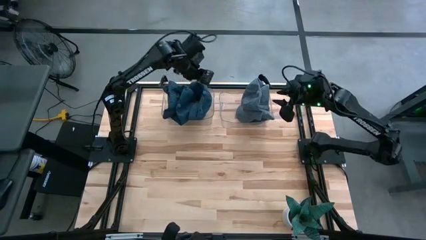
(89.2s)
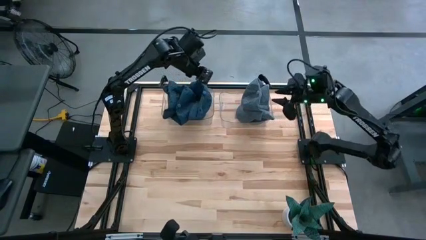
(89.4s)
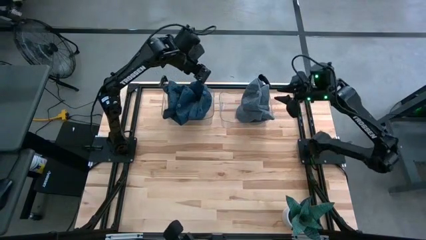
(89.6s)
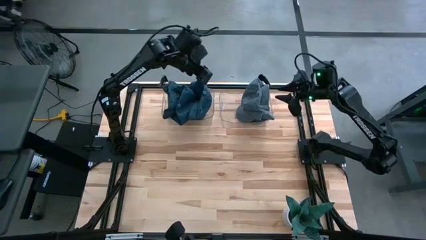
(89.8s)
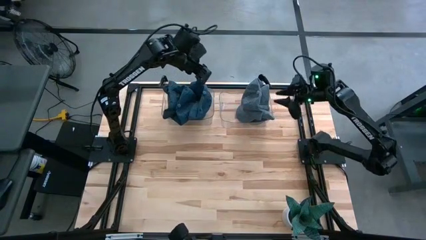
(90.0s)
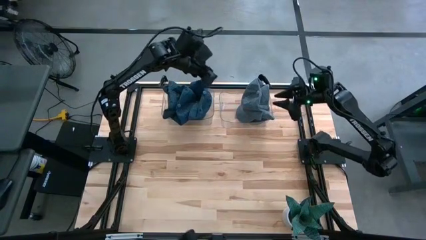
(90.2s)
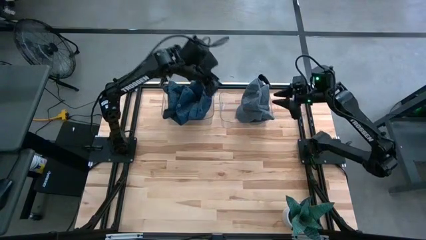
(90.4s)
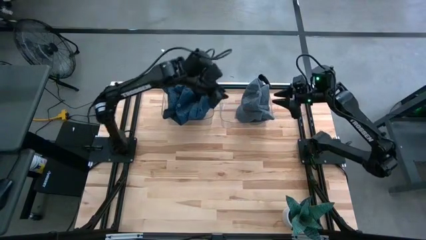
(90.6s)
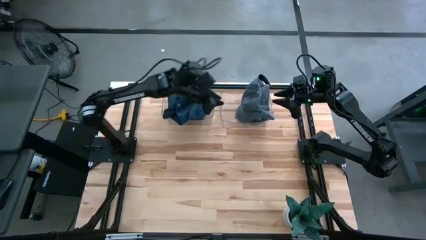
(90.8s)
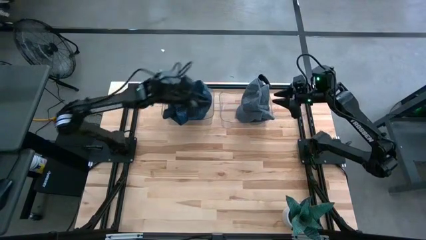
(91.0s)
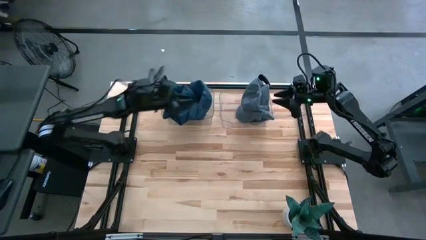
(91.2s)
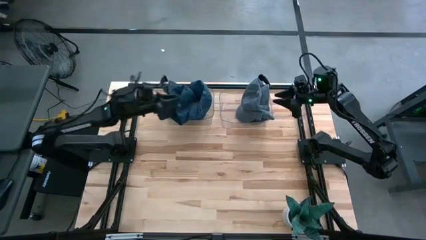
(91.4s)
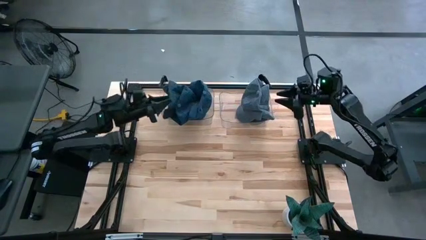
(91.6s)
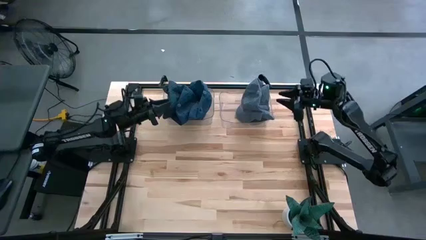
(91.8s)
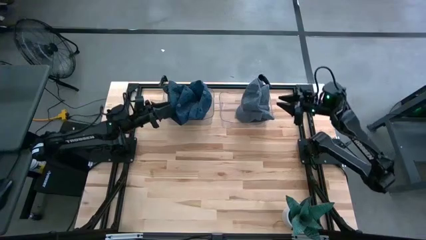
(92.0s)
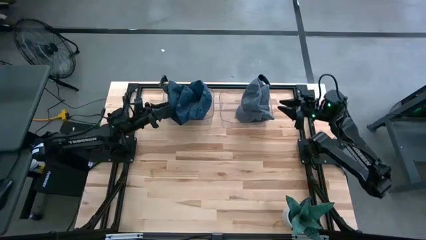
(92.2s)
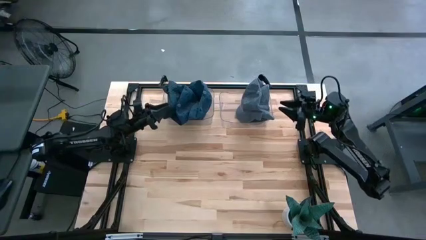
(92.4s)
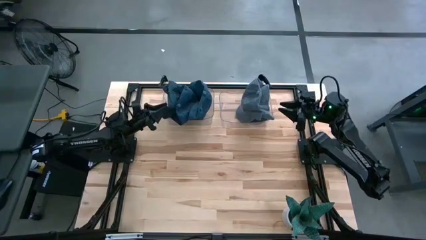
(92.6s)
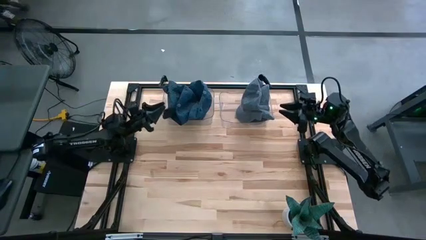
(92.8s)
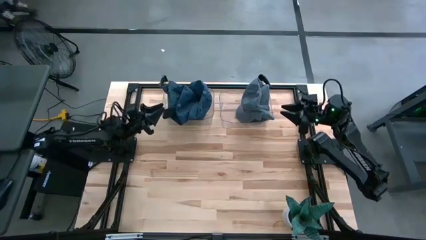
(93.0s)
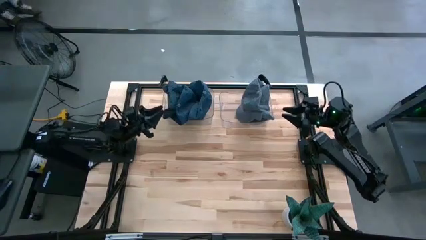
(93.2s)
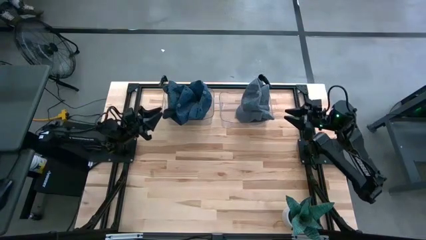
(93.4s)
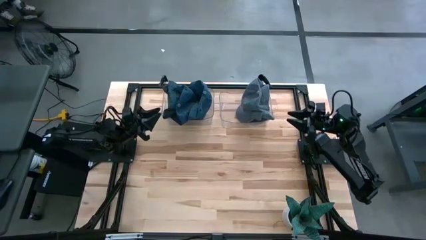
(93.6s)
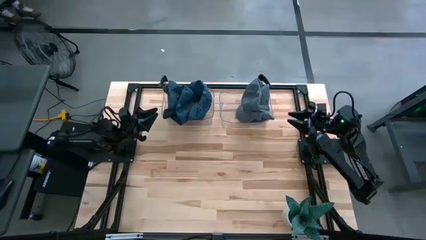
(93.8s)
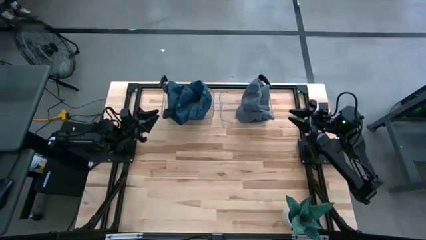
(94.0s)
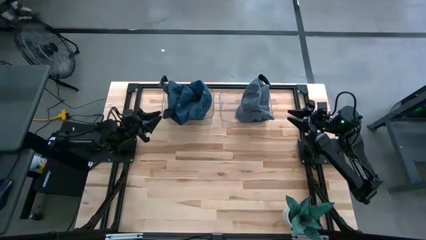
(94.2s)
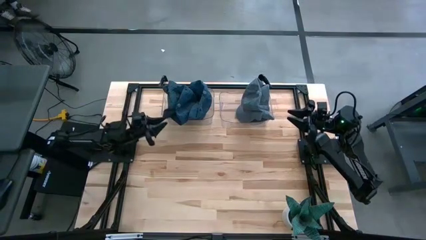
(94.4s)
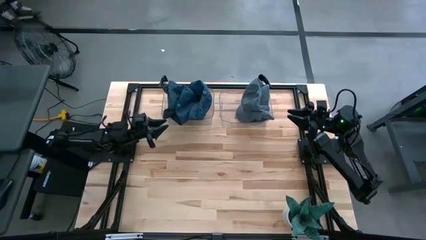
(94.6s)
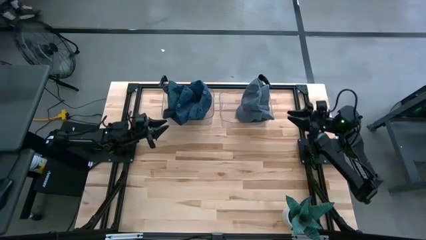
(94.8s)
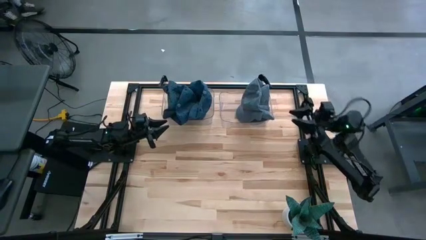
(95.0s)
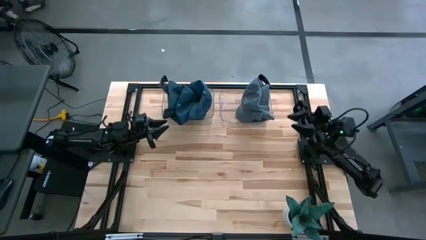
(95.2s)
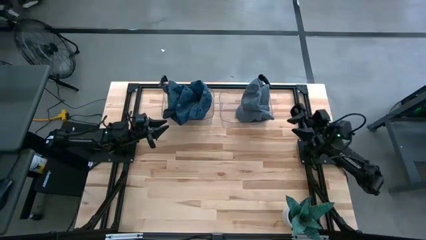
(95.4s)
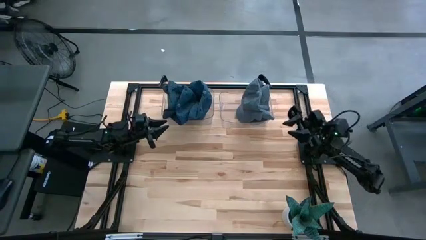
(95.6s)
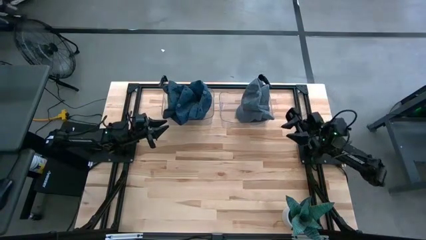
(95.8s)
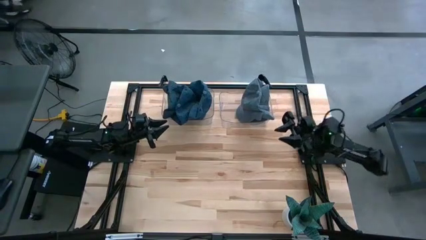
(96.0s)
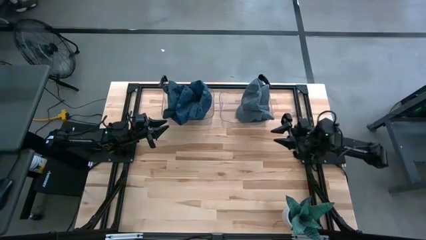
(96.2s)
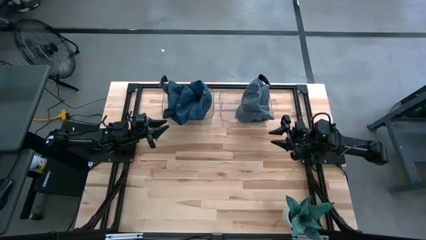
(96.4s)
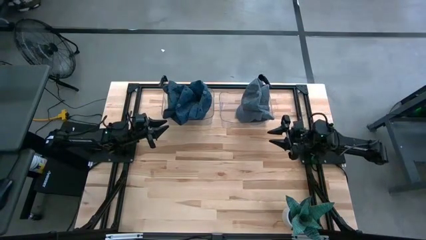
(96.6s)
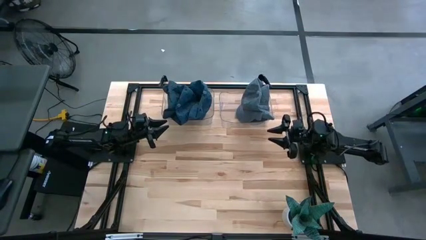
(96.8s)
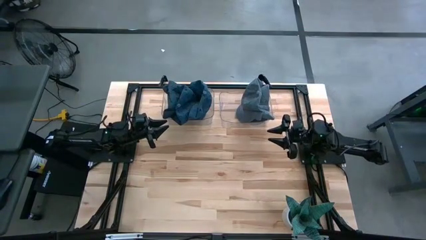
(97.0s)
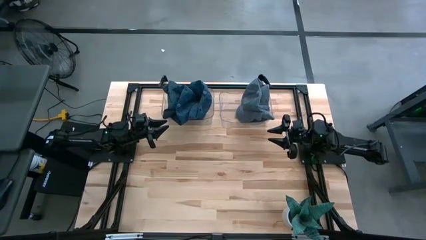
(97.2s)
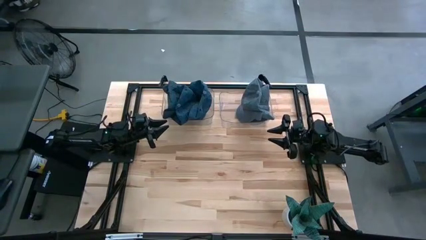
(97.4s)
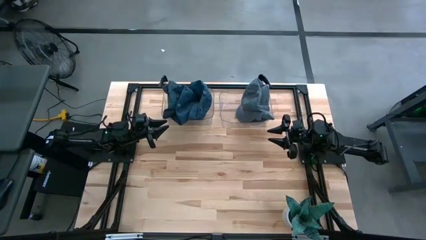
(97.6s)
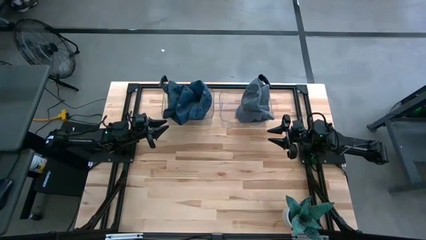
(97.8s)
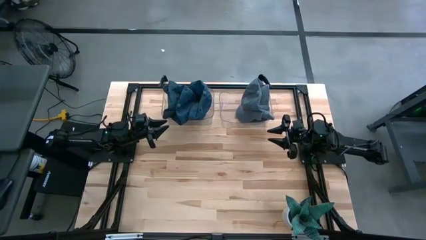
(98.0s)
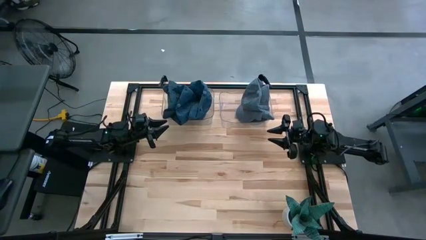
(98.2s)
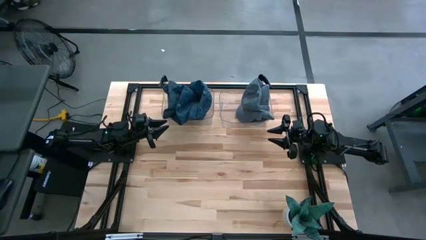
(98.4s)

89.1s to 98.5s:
Task: Pick & Place hat
Return to Home Position

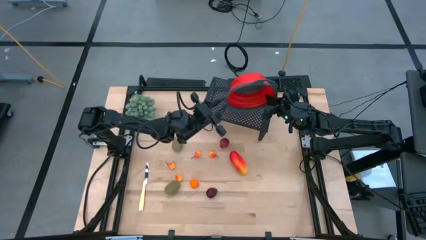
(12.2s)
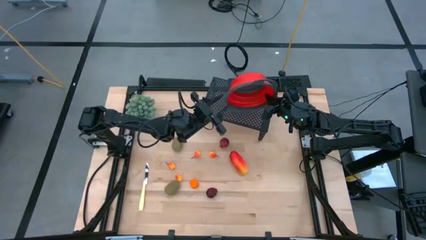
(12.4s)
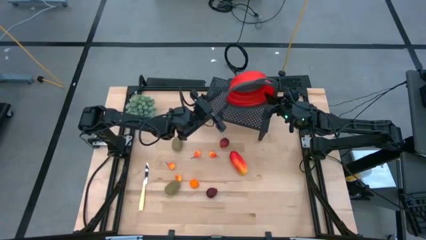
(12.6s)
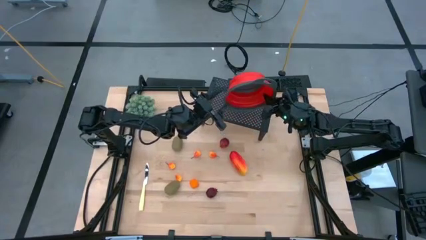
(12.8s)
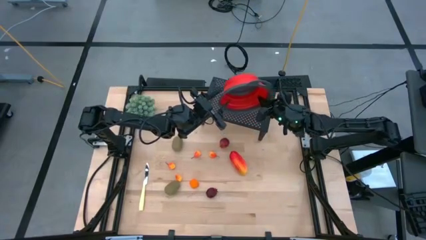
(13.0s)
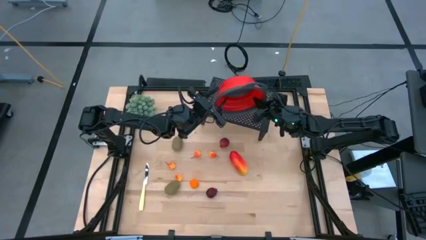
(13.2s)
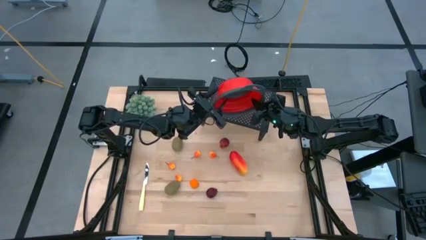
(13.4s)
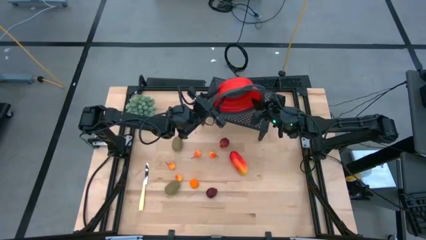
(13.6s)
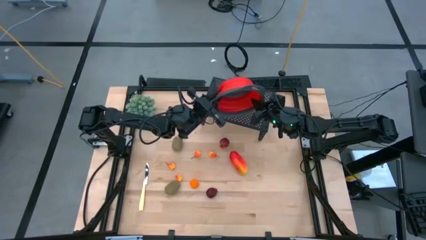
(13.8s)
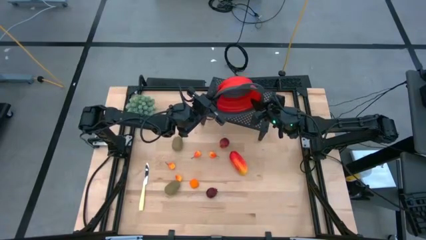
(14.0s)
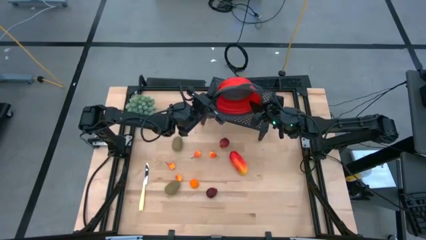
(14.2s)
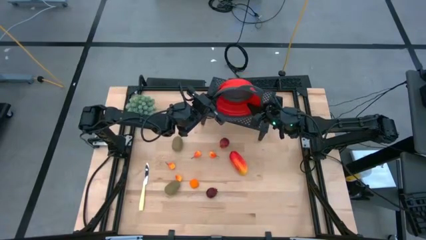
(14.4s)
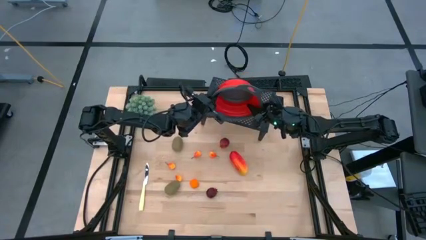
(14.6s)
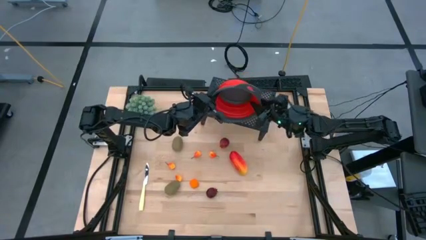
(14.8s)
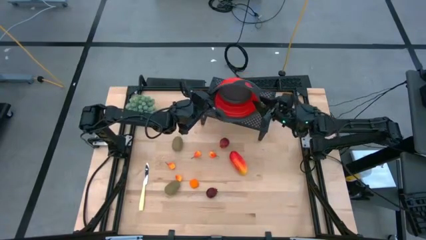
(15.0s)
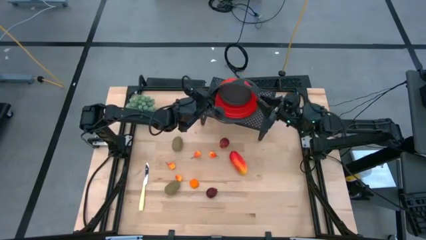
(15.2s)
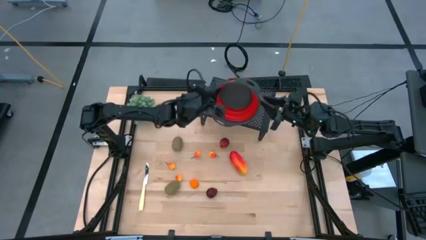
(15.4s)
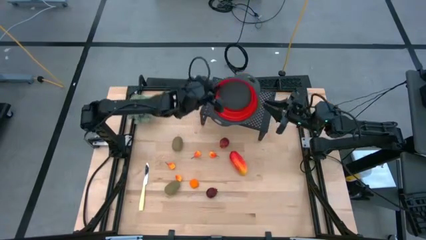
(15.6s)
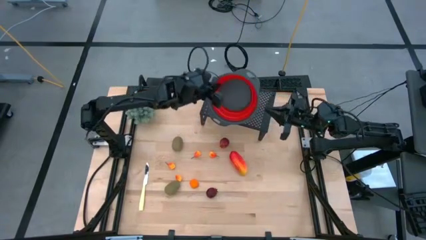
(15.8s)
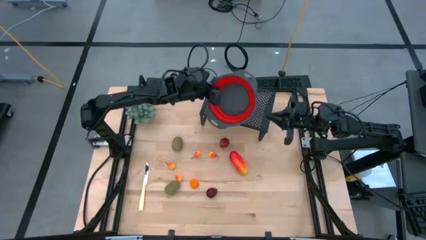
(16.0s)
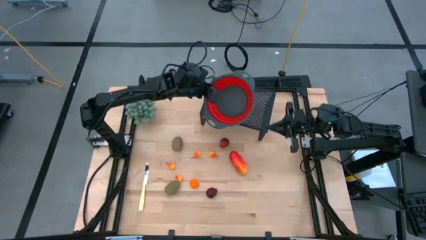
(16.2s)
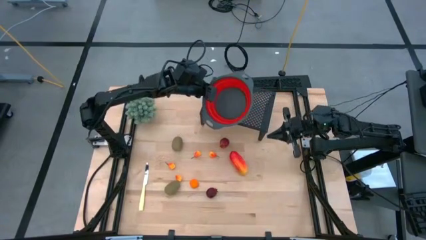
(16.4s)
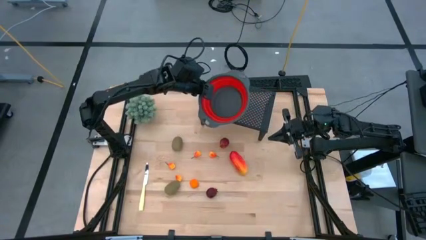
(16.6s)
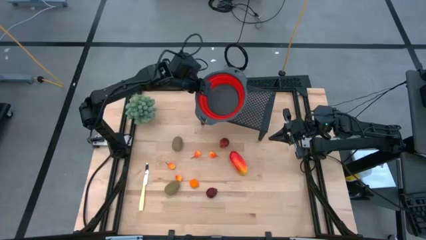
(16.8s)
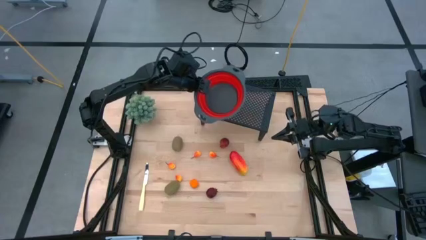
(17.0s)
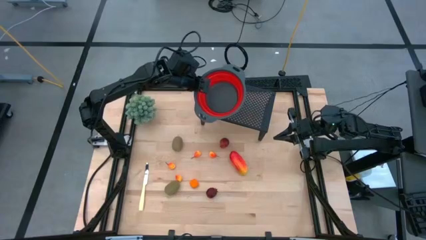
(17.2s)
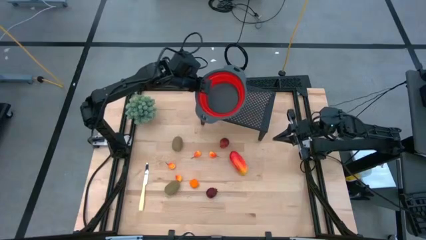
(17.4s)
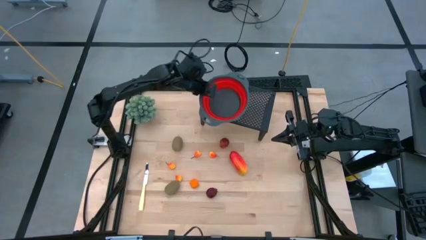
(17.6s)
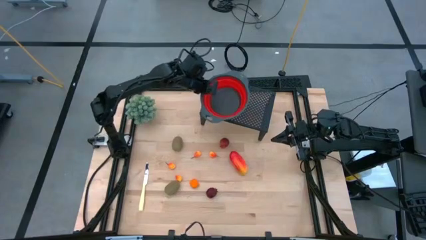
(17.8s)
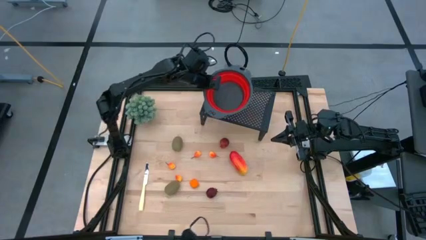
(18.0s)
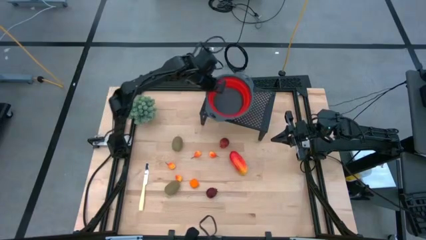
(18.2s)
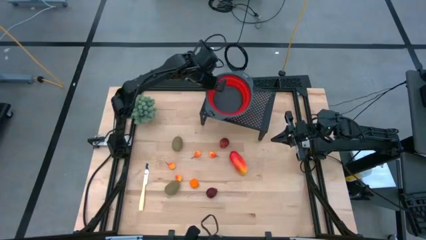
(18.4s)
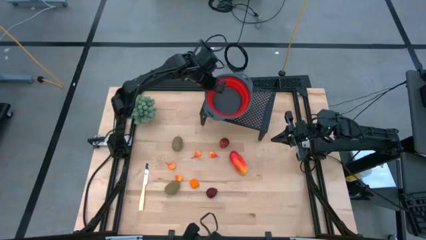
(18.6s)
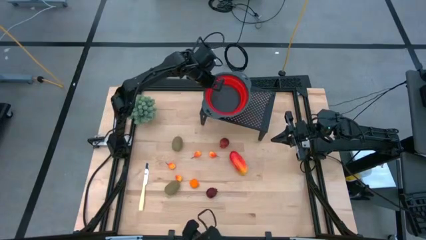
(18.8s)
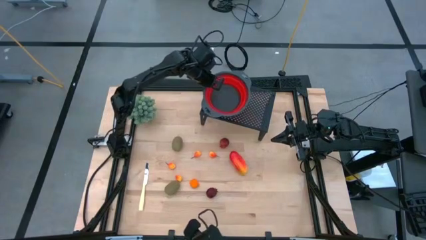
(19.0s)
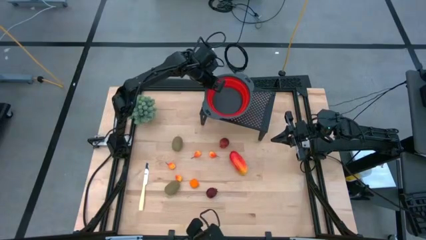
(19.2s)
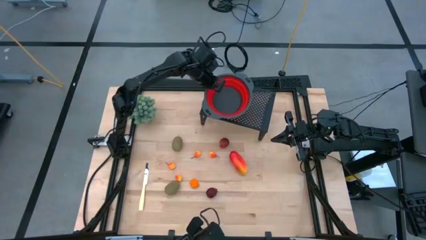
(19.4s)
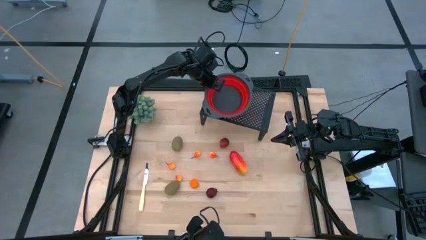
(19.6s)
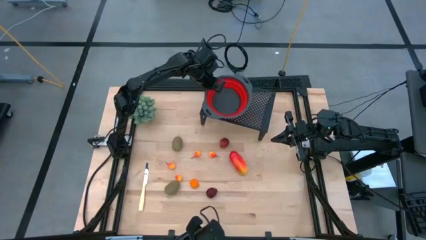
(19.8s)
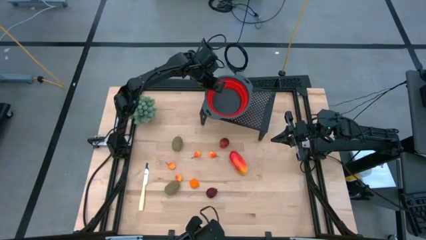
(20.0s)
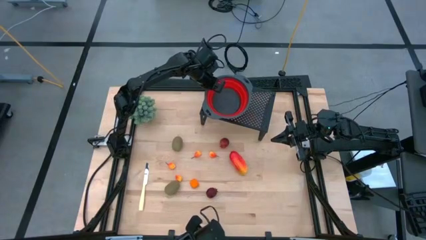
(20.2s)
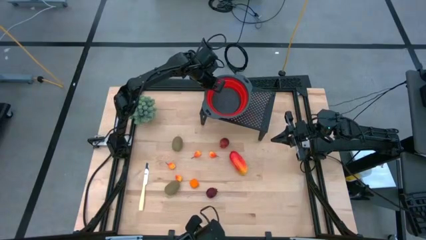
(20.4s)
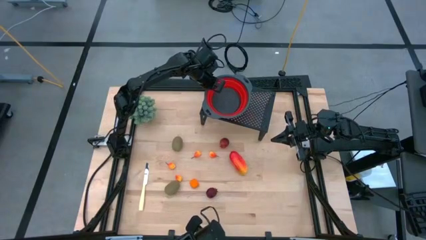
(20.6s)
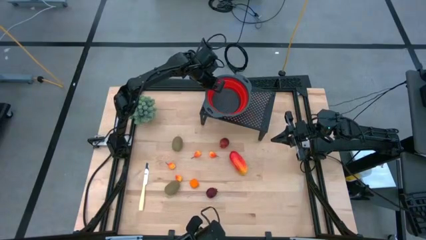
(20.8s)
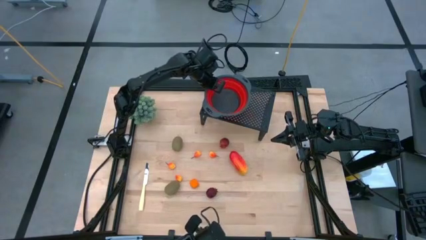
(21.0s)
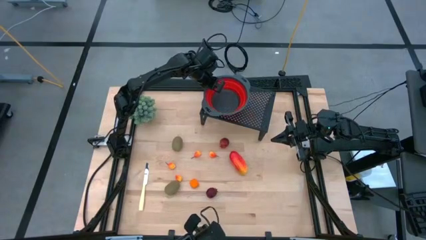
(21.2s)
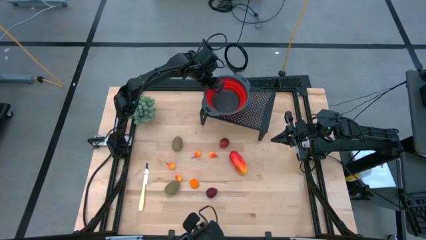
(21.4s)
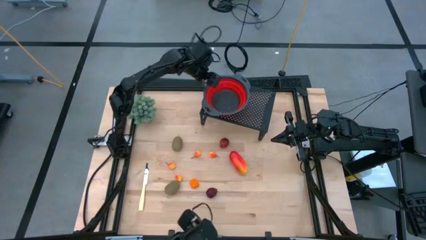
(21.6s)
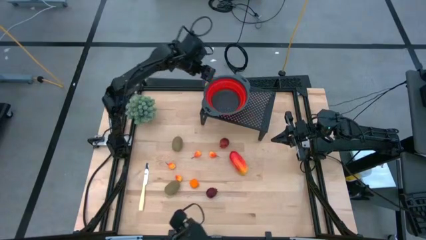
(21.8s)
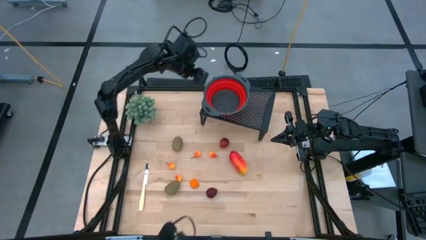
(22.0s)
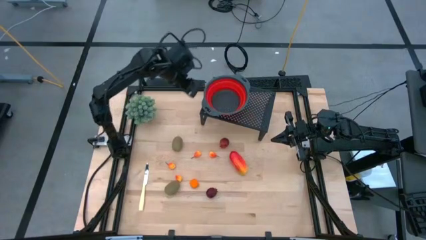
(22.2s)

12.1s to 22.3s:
Task: Pick & Place Fruit
Put the red strainer bowl on the shelf
